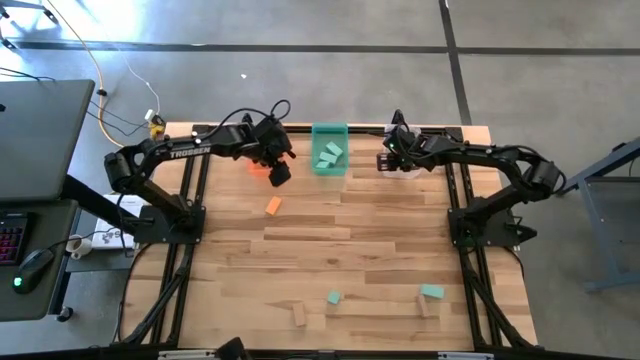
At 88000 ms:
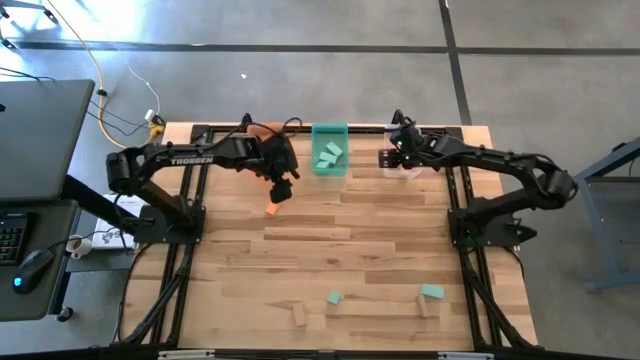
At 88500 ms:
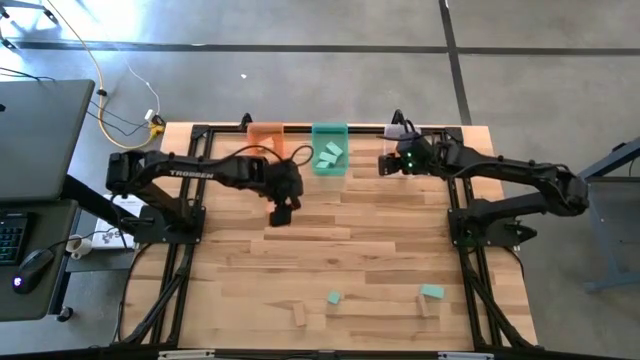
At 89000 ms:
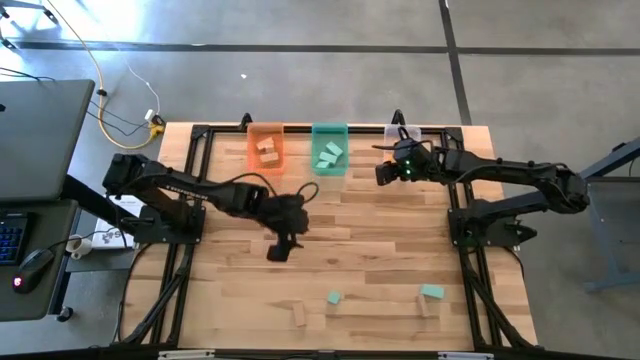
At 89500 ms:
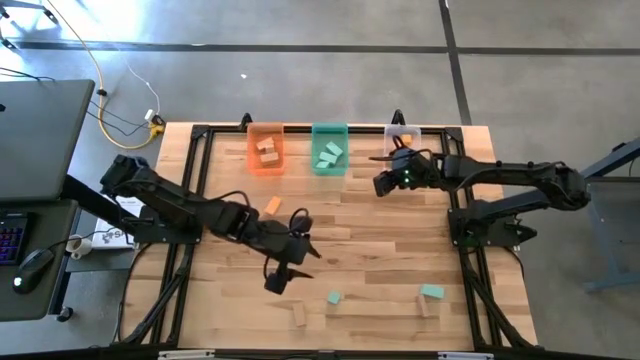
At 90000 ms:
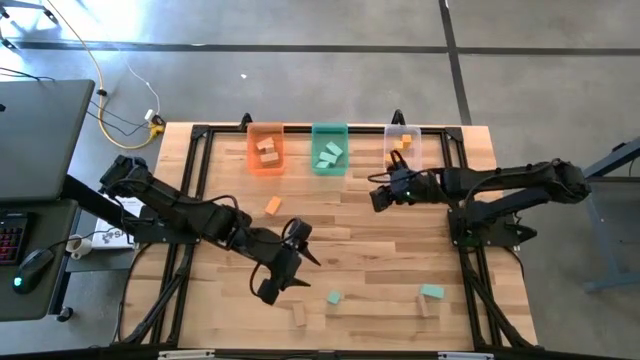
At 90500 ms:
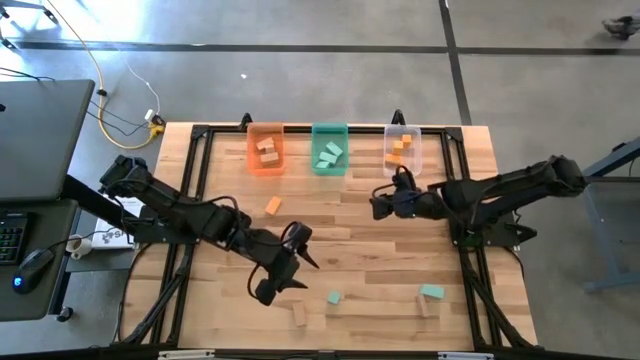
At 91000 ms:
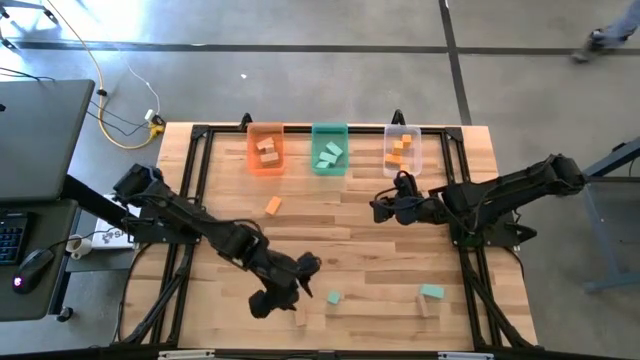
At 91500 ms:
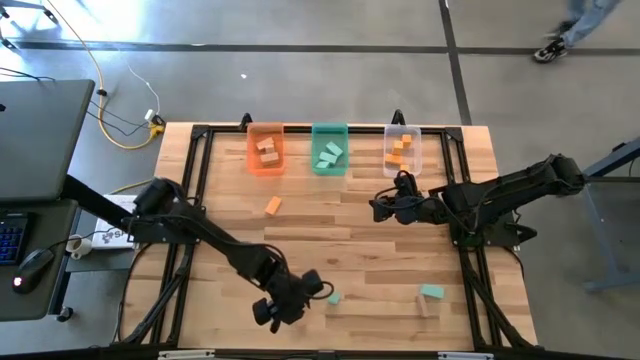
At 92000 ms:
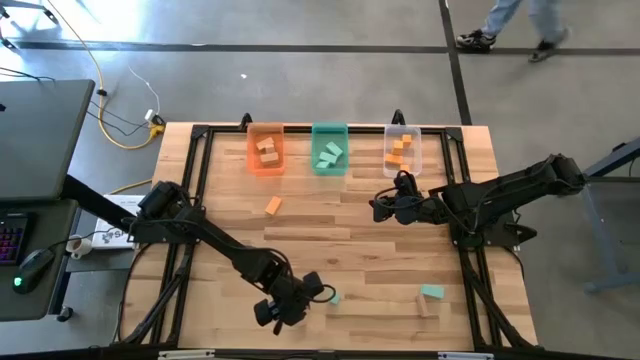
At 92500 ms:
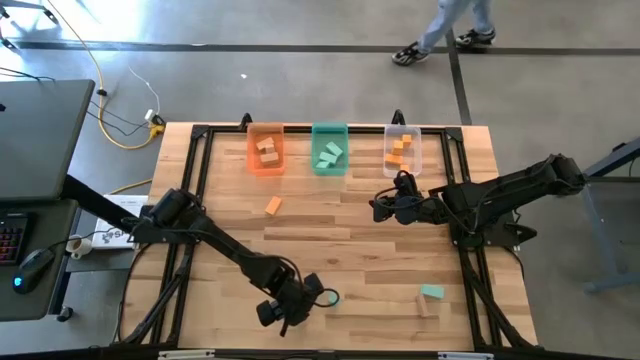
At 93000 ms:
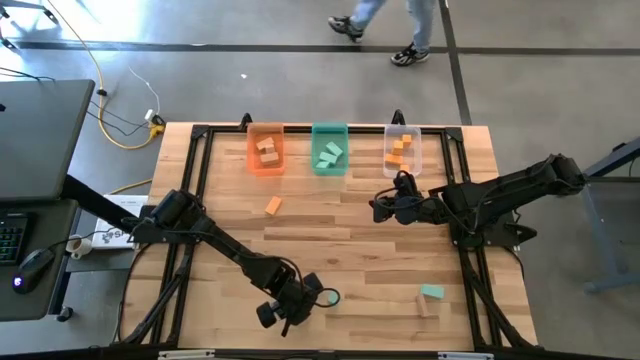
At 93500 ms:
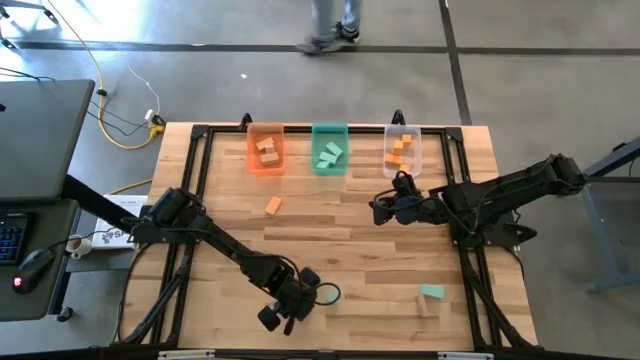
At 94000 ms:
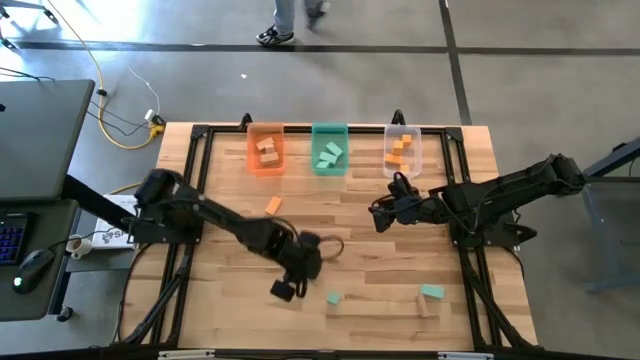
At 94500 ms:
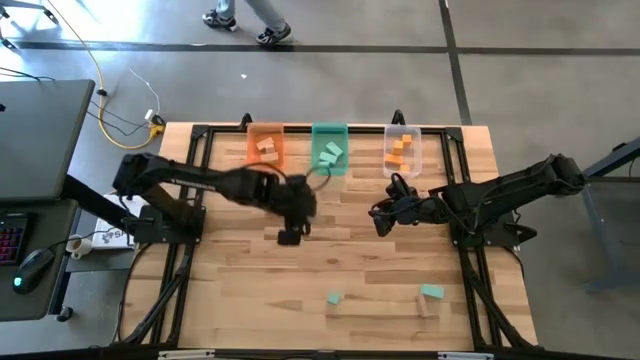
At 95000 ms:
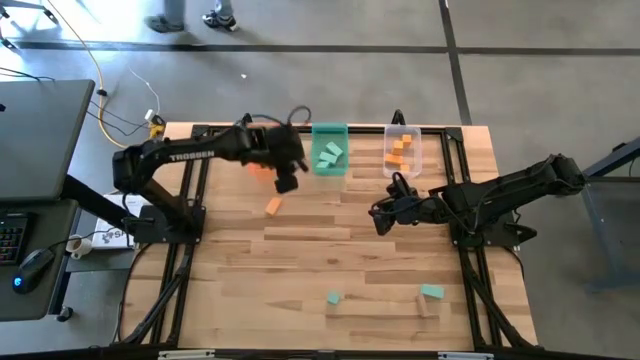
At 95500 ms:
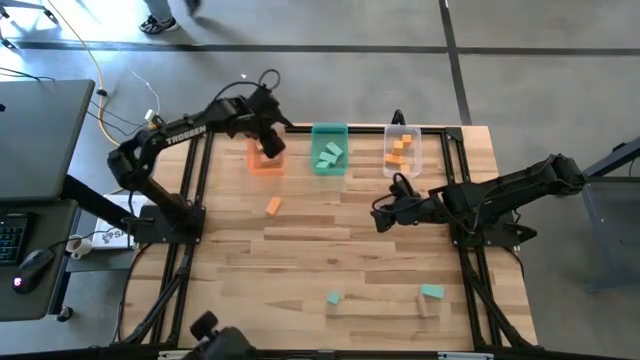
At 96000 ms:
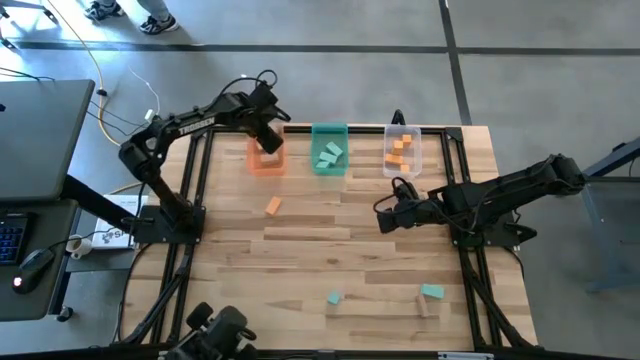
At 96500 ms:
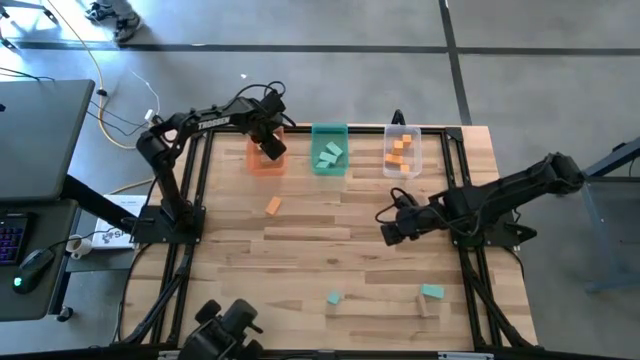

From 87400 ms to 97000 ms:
Task: Sort & place blocks by color
Put the brown block into the orange bin

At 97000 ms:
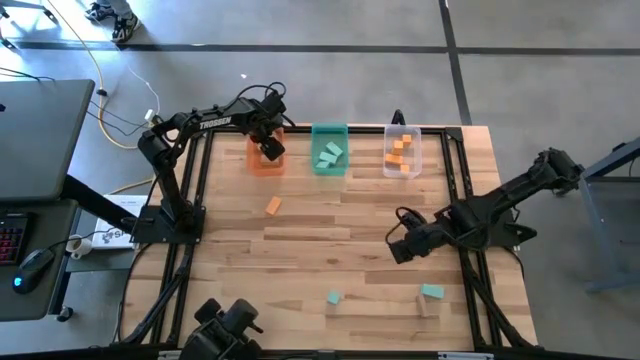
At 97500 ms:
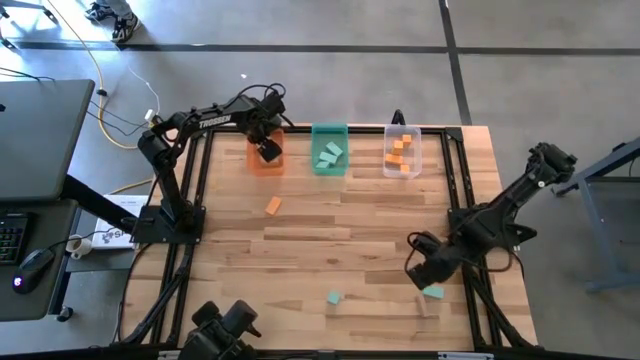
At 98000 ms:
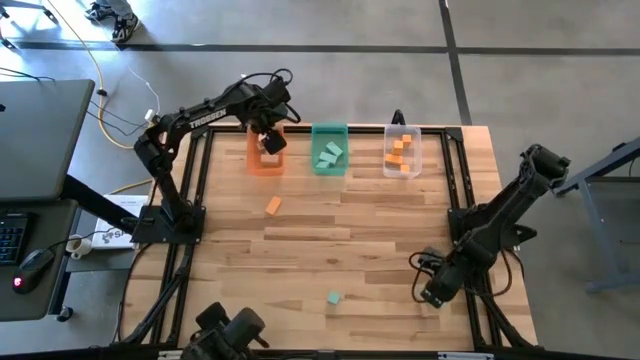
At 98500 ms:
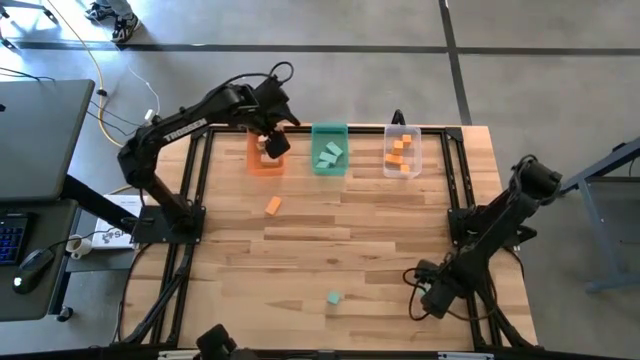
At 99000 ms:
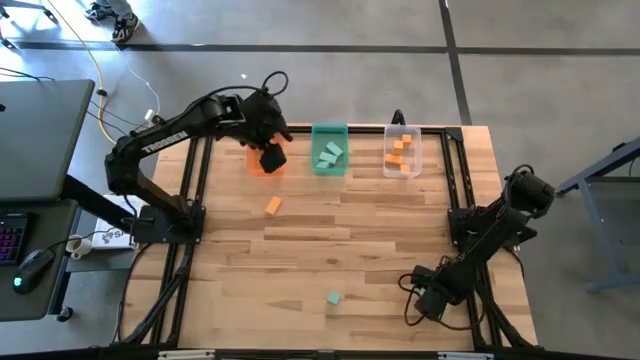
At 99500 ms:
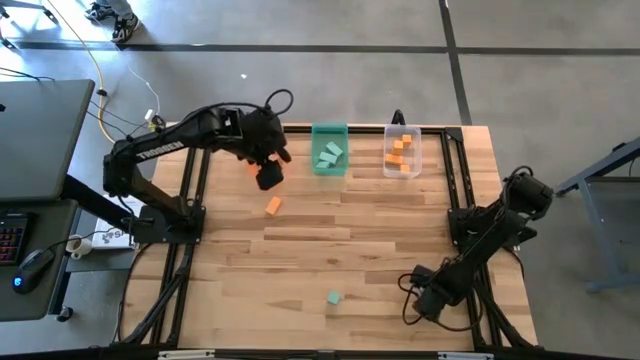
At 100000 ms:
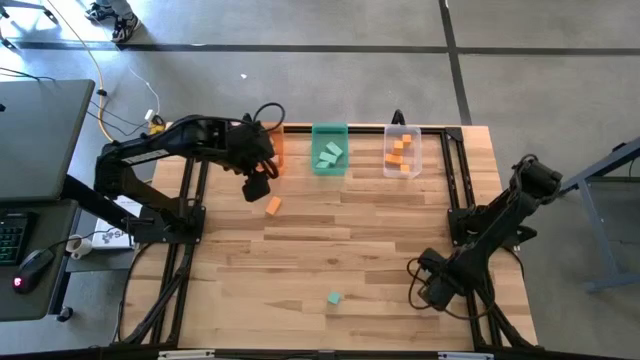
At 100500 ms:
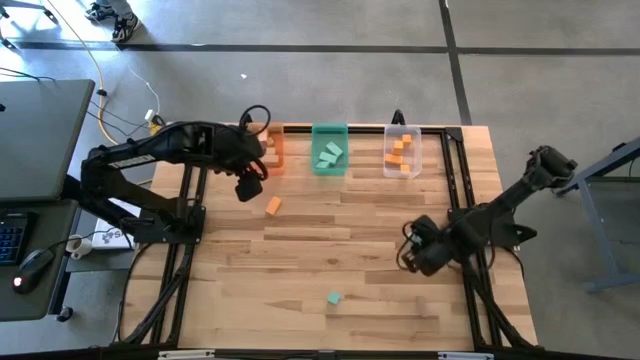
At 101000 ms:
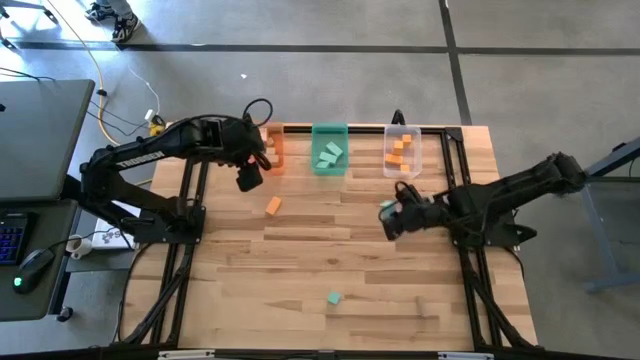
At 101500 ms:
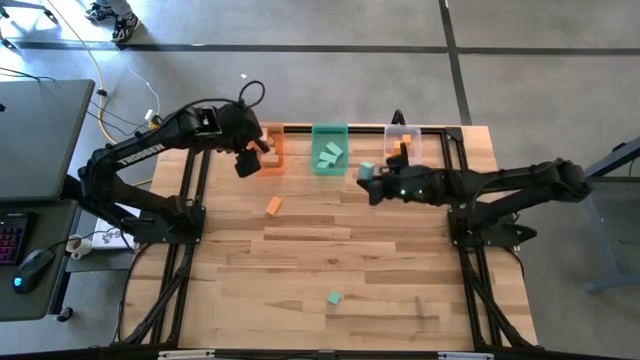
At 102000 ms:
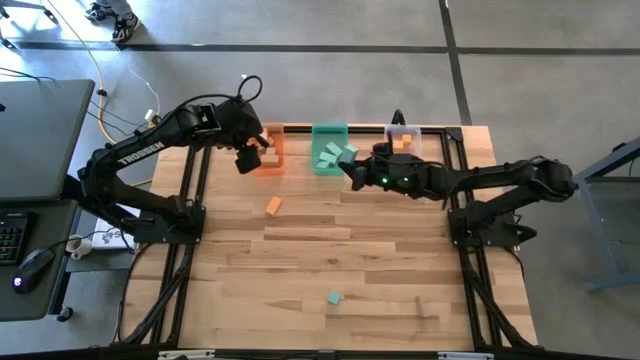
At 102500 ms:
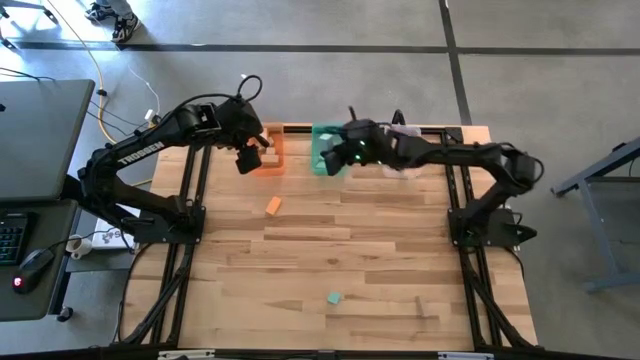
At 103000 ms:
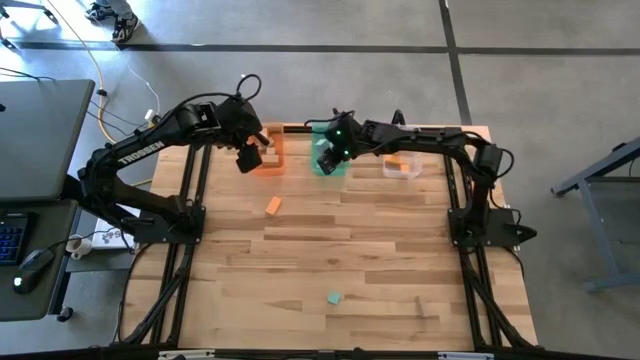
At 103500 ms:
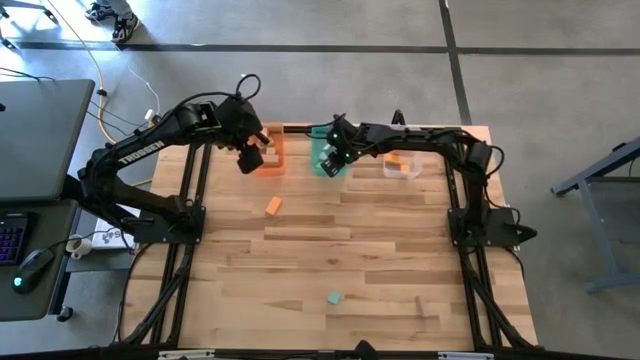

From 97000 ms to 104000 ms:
Put the blue block into the blue bin

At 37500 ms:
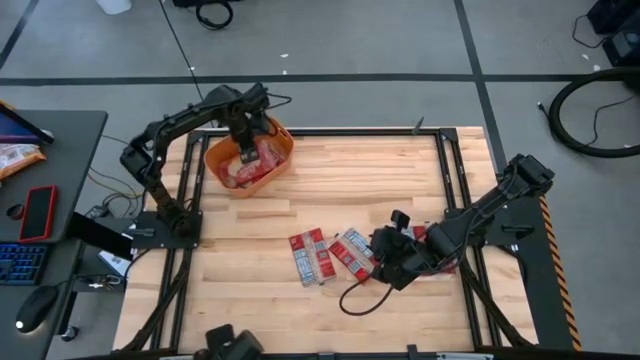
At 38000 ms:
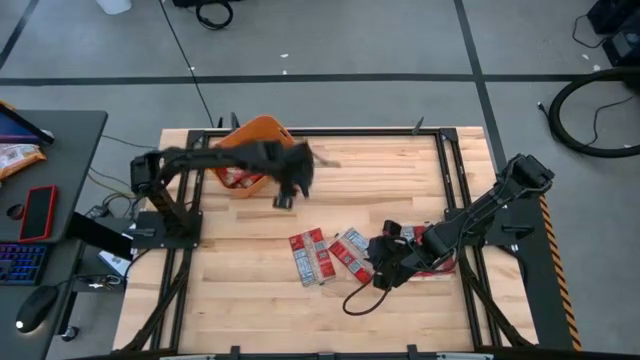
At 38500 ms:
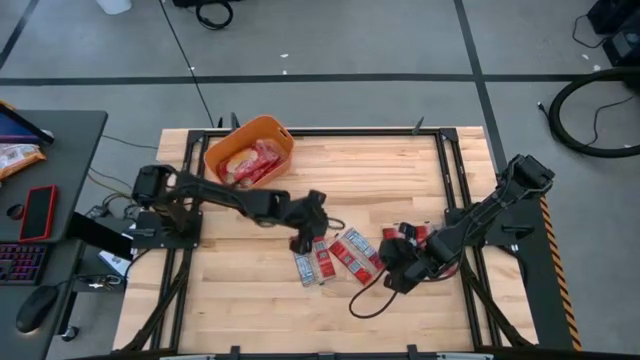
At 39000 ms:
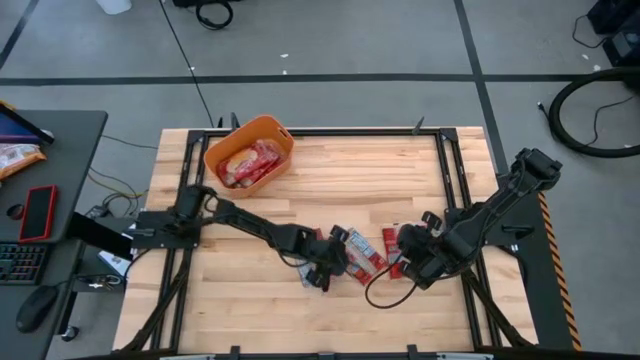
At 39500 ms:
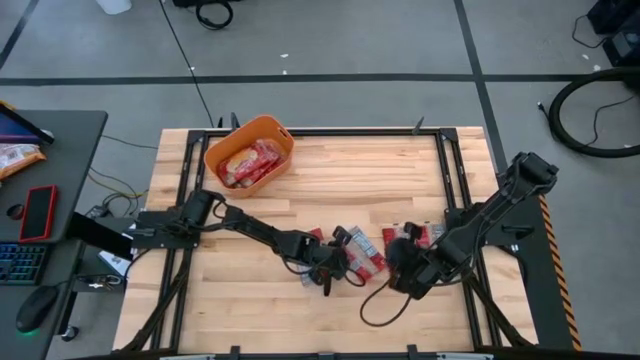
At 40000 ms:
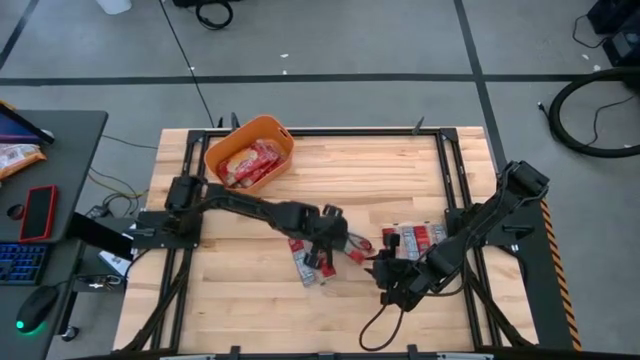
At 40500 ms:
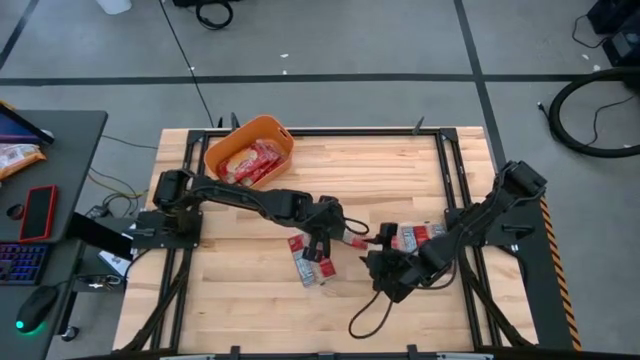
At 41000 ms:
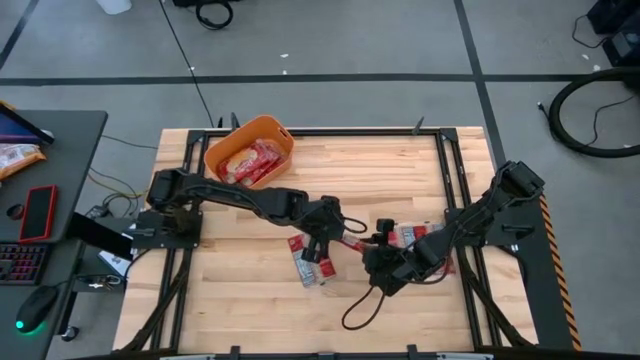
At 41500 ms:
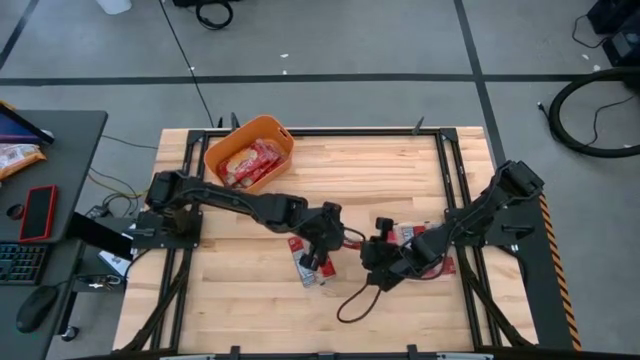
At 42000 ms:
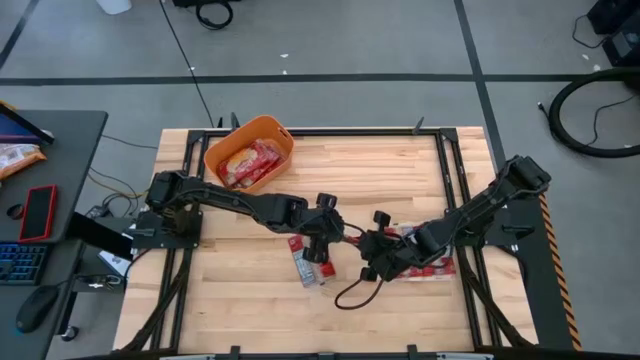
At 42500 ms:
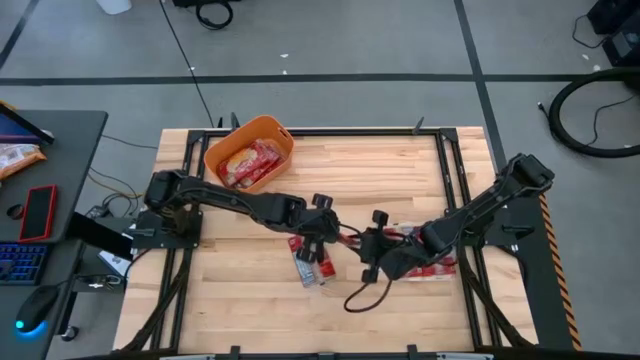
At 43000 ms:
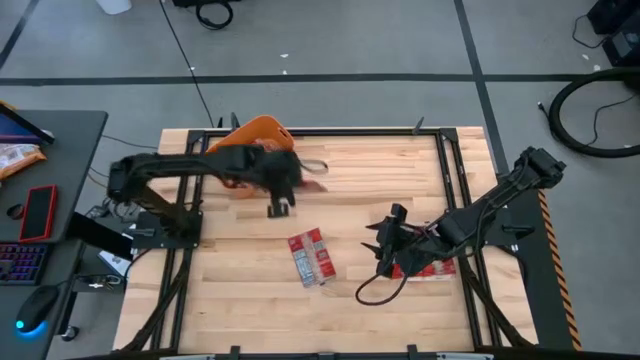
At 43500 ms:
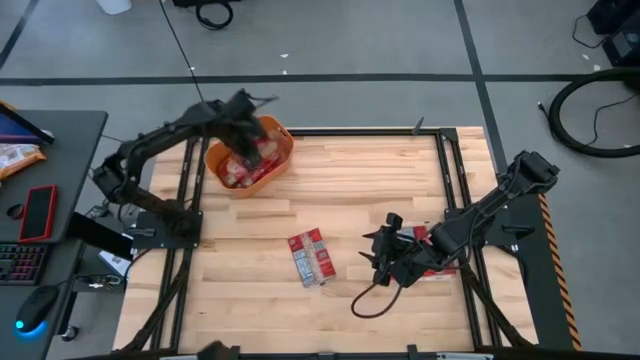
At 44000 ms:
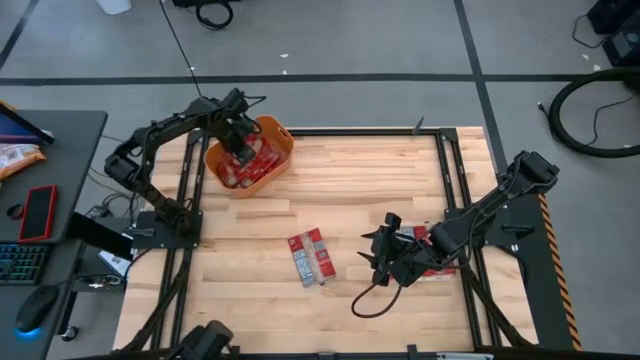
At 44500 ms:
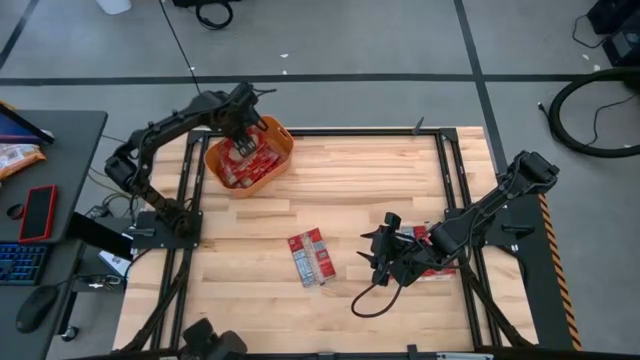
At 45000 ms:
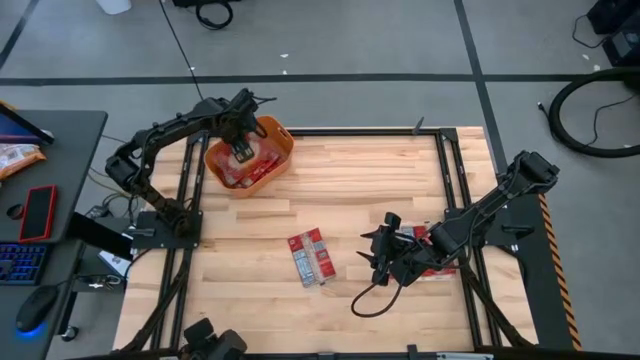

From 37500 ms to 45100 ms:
Task: Sort popcorn bags into baskets
Put the red popcorn bag into the orange container
